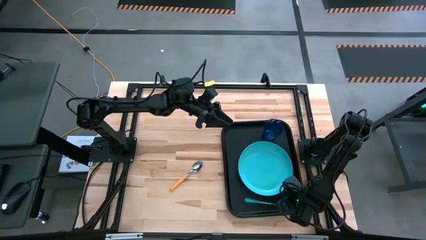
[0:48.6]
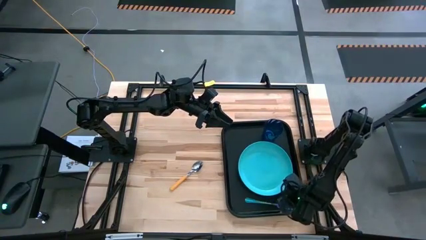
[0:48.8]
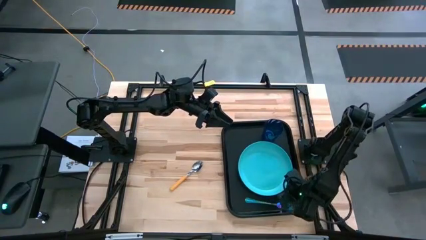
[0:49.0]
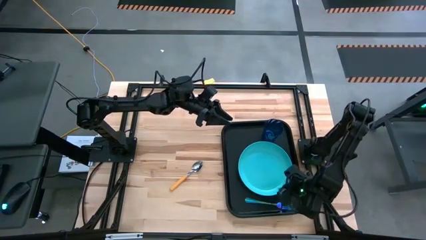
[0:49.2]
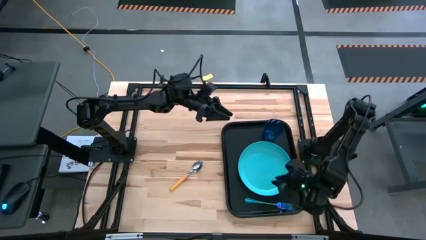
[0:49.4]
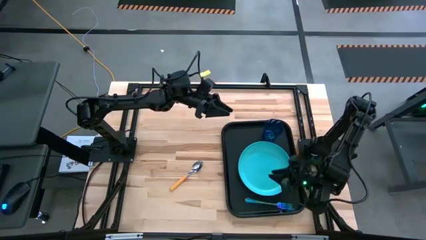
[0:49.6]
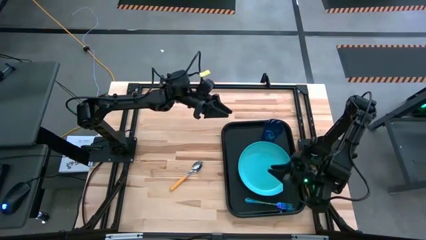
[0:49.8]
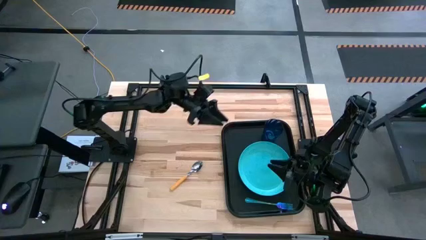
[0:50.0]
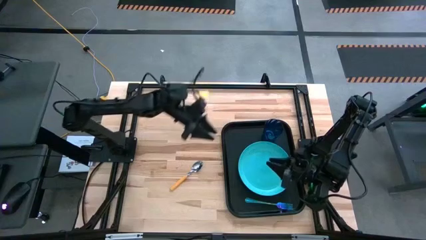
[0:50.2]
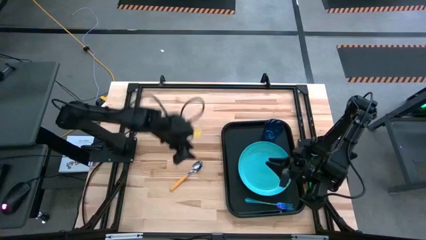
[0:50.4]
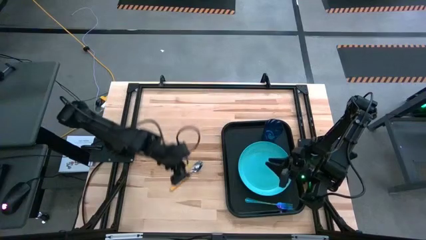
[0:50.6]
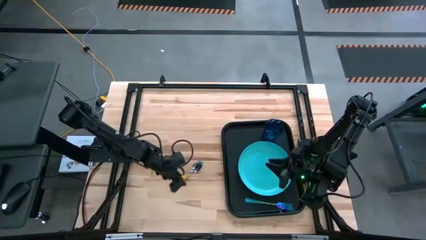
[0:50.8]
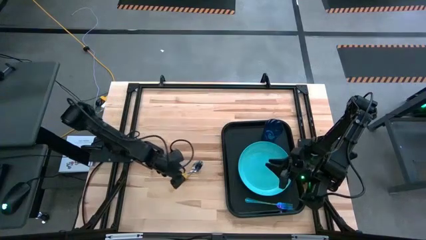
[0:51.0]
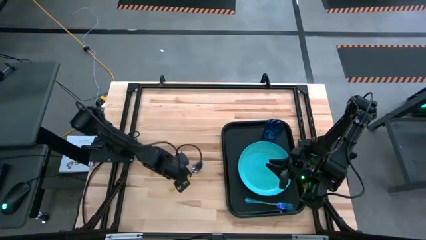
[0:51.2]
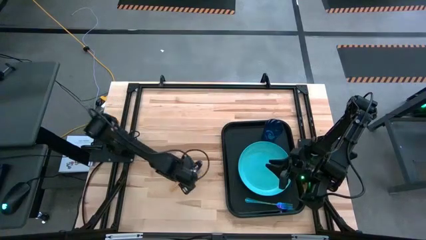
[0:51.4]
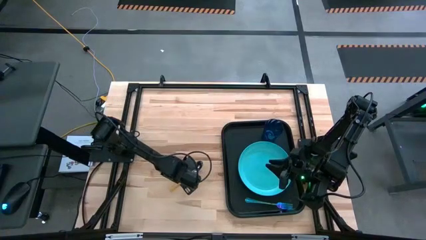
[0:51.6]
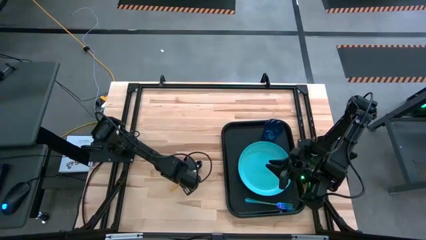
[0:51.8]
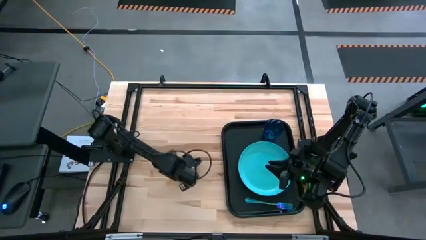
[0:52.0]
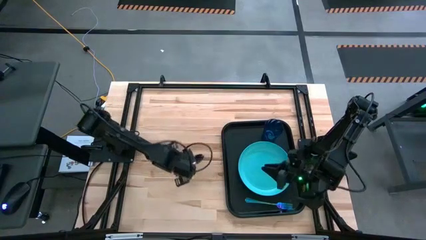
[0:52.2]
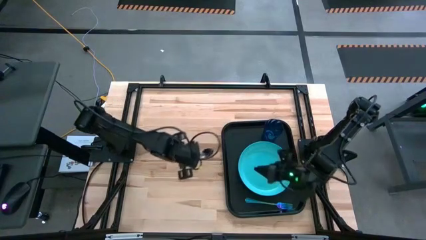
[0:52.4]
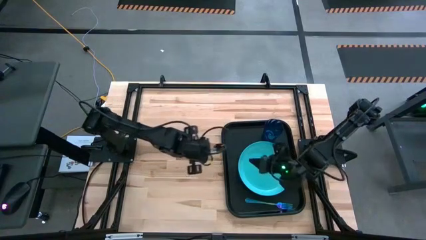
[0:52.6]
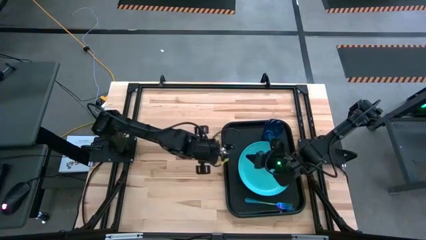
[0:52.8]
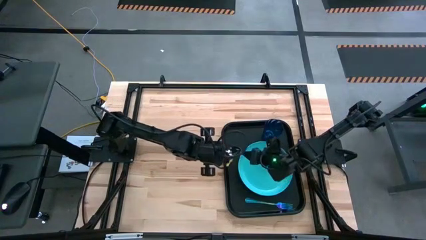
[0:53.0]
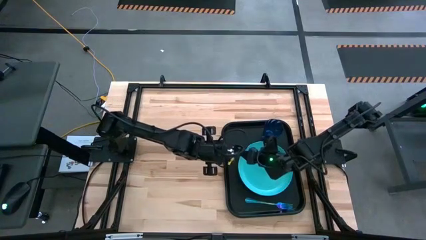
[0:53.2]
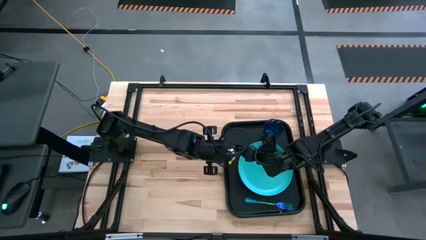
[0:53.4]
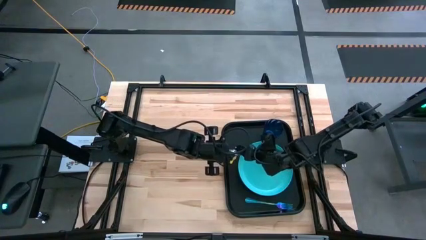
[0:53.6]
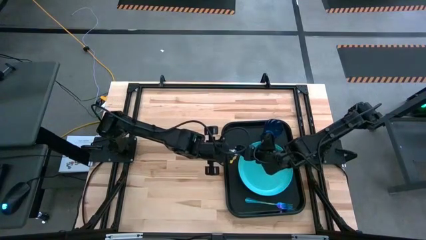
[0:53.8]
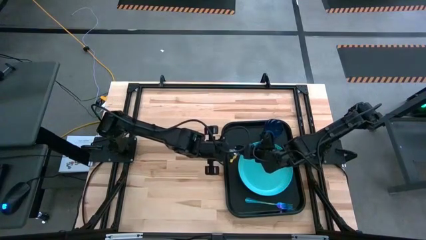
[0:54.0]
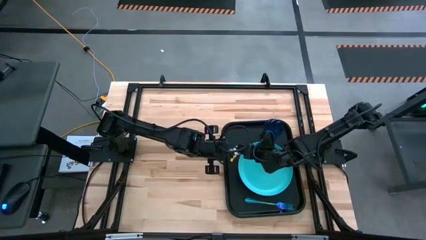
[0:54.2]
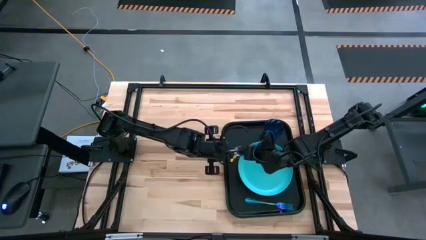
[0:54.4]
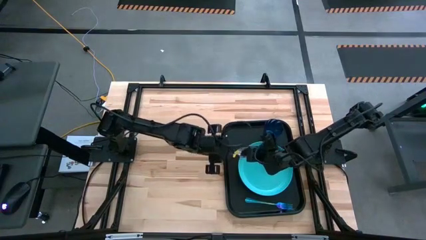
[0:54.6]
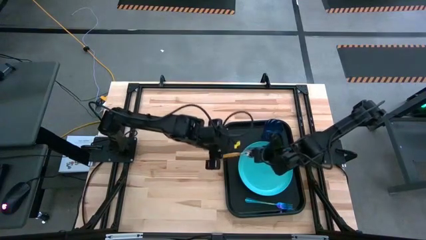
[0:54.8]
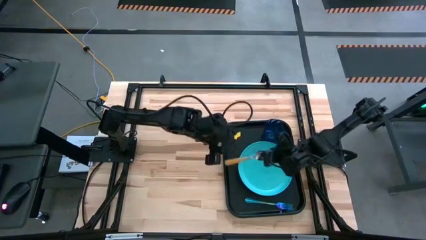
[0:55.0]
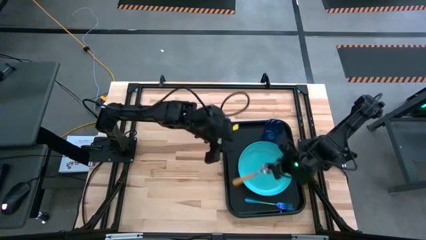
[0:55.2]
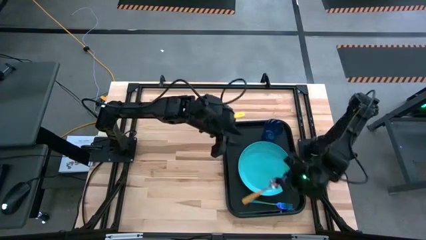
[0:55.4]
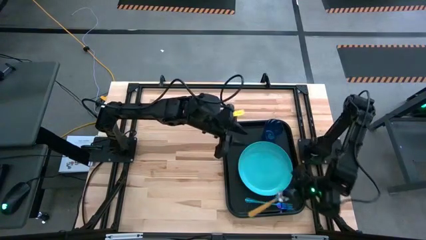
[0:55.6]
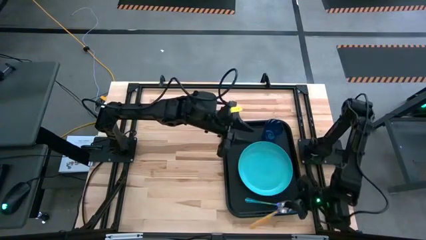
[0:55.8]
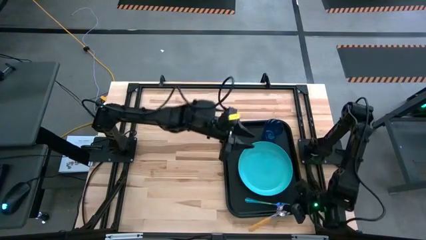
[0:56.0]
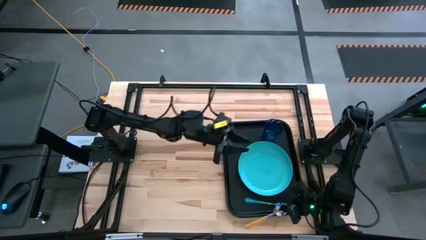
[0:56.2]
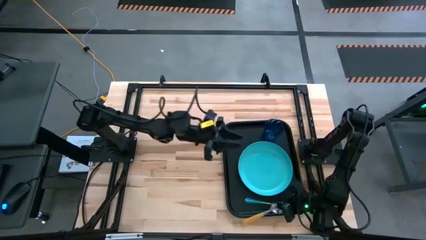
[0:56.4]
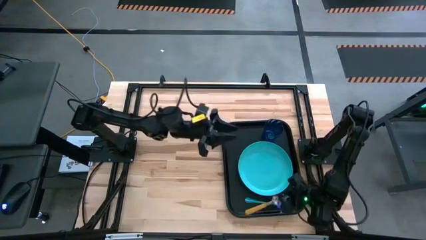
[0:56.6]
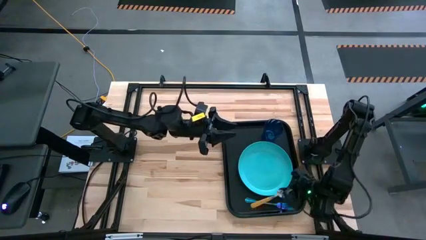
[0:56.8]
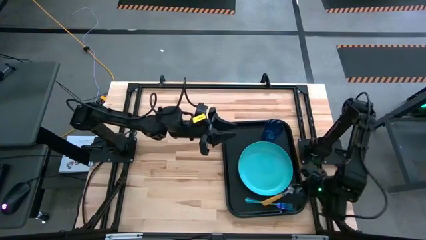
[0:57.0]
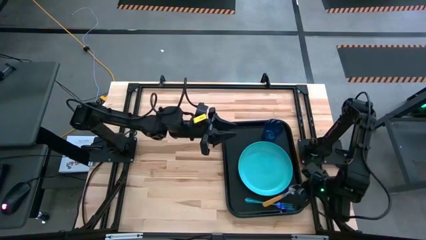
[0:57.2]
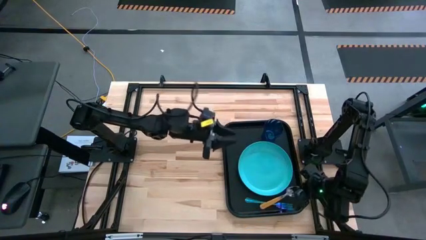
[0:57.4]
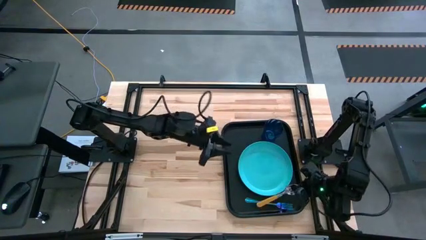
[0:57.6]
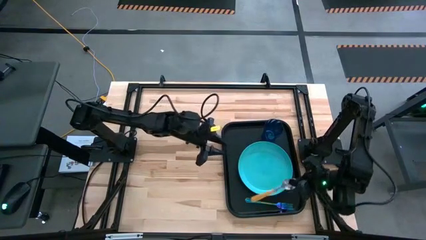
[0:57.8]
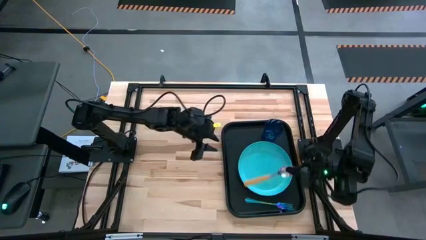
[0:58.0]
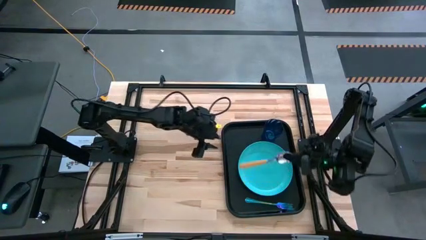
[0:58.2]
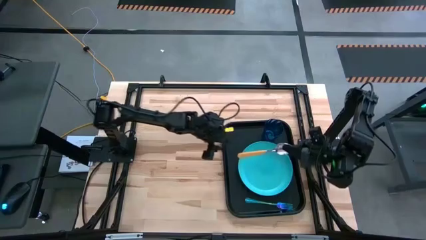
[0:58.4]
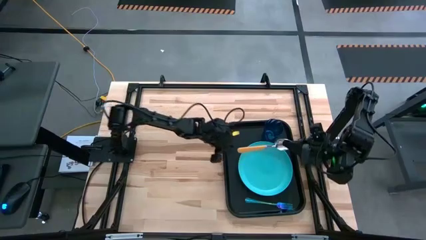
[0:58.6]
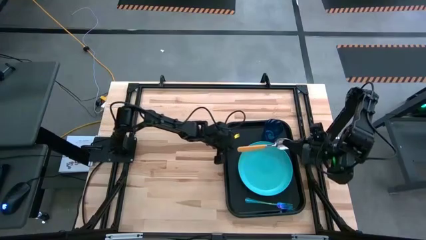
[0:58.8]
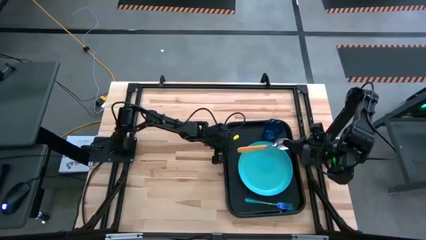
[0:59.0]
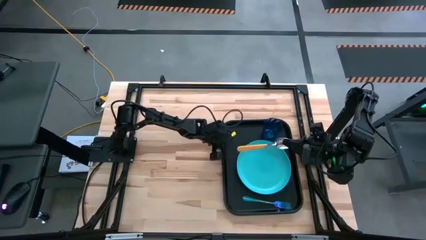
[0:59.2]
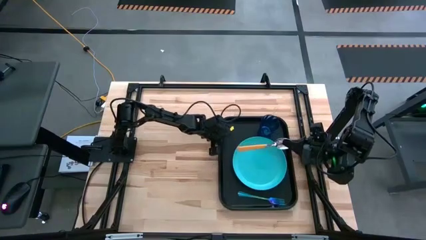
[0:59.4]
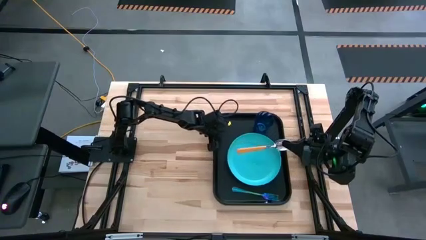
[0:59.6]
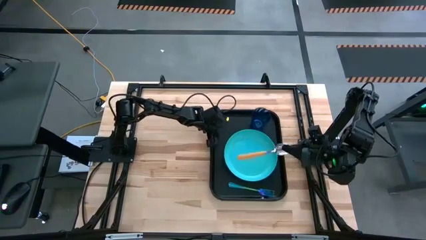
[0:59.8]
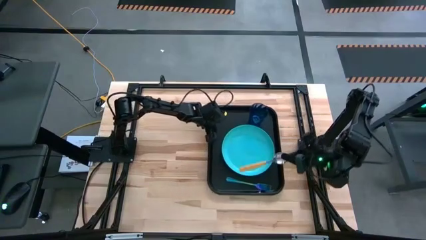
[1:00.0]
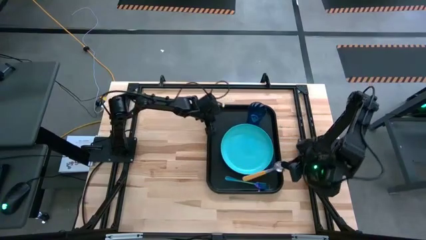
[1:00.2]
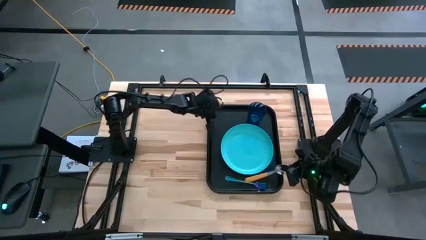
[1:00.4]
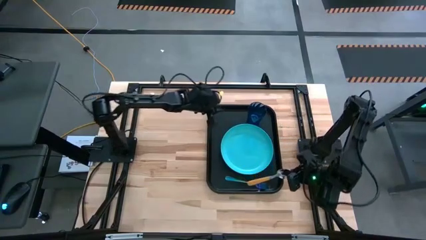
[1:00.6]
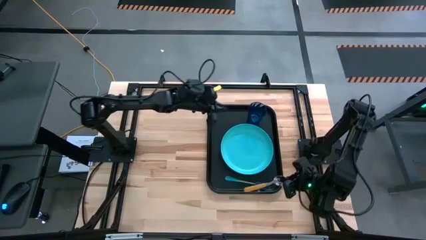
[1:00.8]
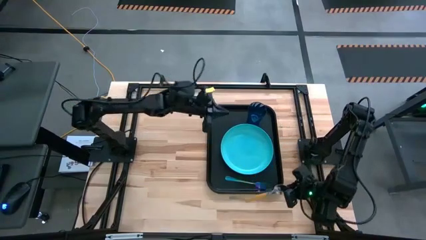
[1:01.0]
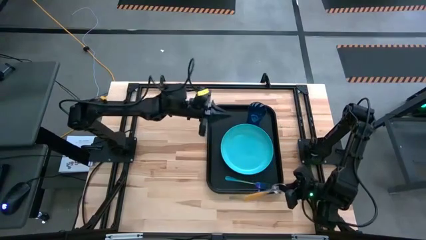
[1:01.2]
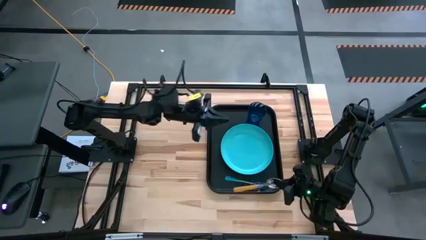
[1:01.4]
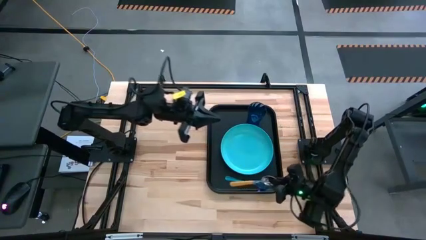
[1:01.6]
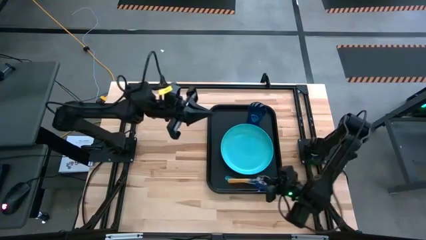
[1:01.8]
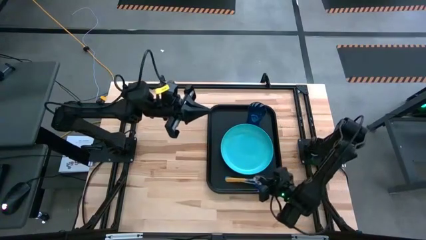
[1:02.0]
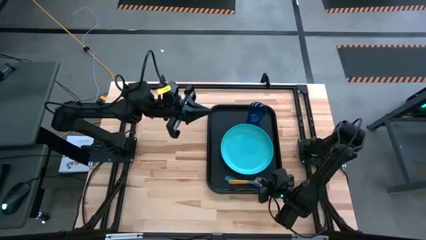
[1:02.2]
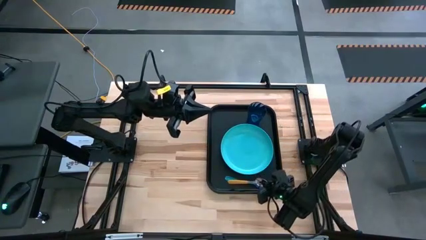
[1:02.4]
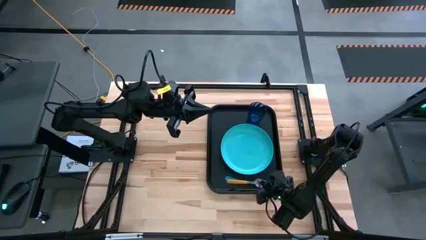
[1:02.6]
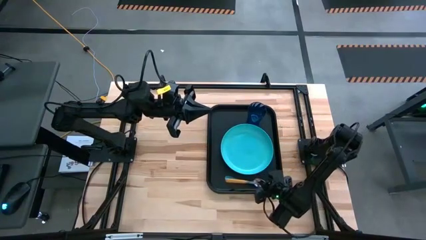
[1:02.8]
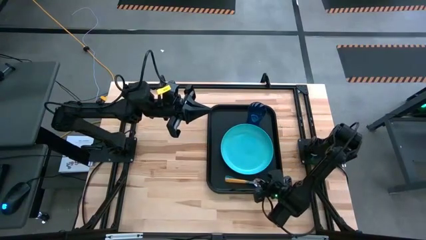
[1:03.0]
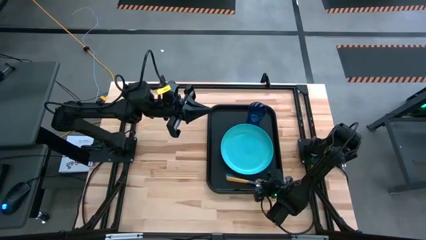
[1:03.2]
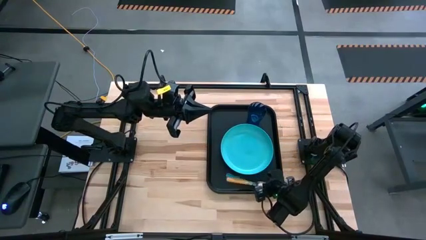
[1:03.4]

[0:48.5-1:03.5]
Task: Pick and place plate/cup/fork/spoon on tray
Put the yellow spoon on the black serving tray to the right of the blue fork
